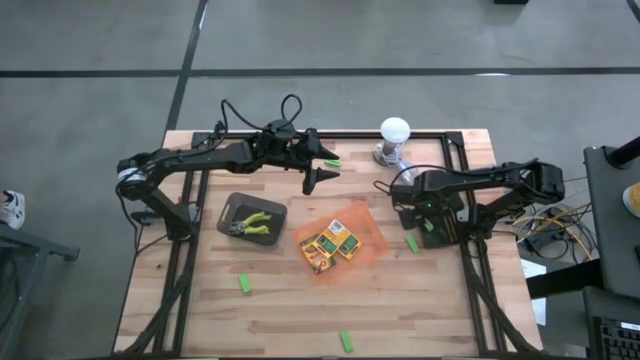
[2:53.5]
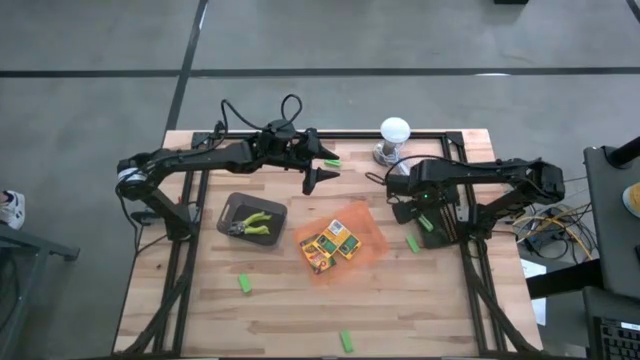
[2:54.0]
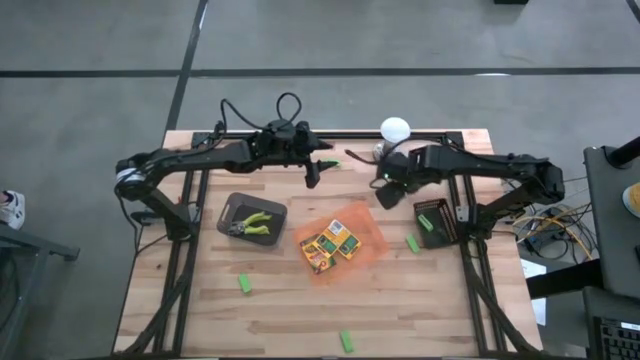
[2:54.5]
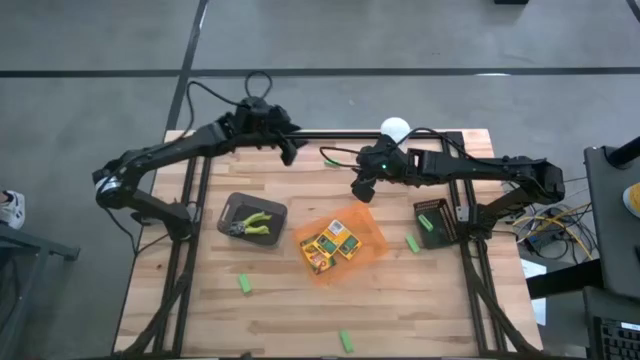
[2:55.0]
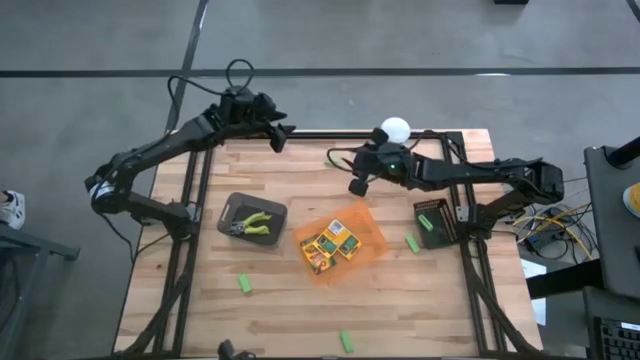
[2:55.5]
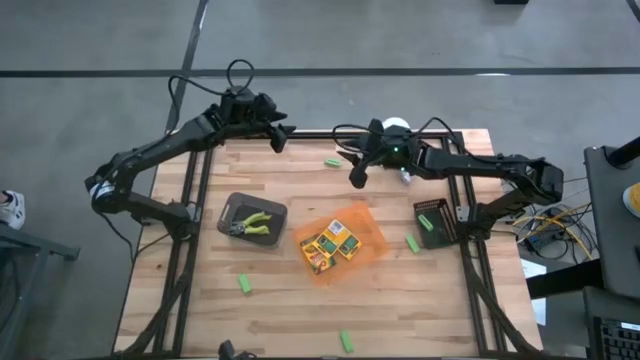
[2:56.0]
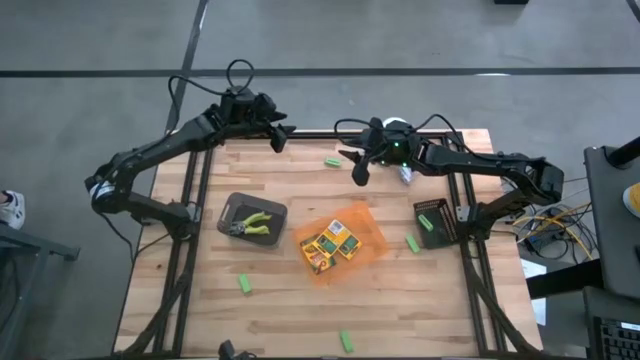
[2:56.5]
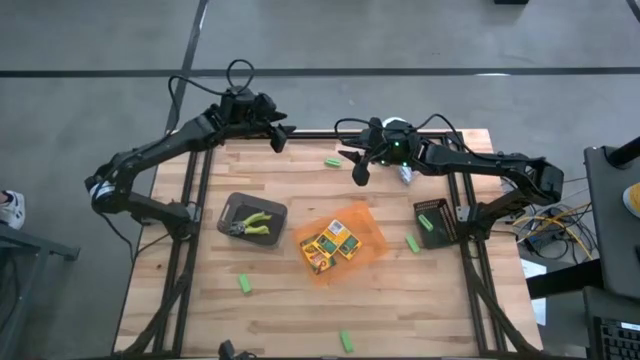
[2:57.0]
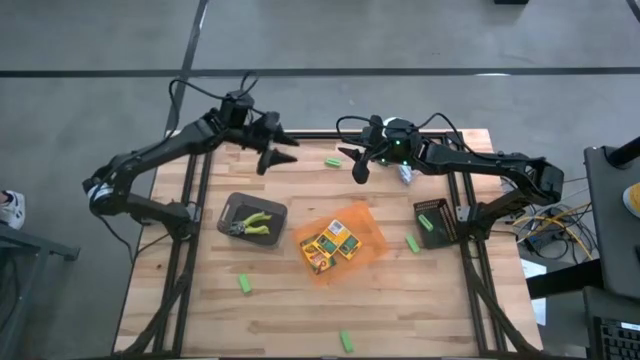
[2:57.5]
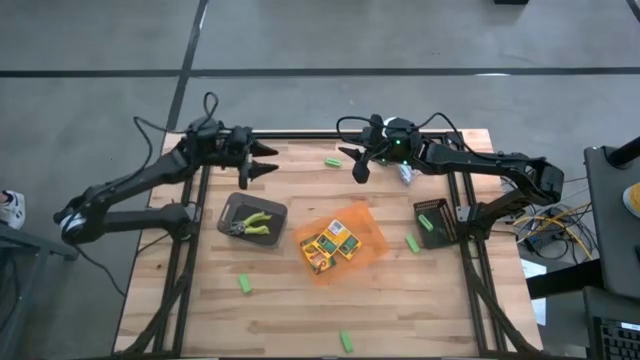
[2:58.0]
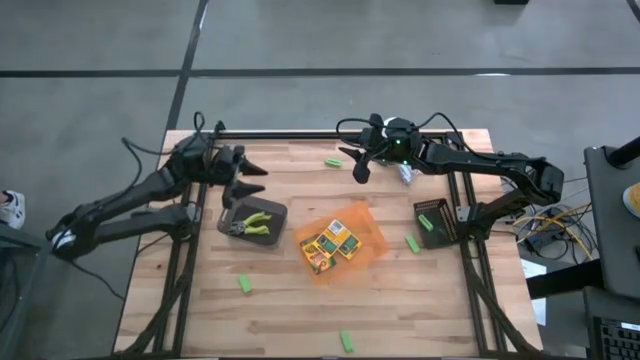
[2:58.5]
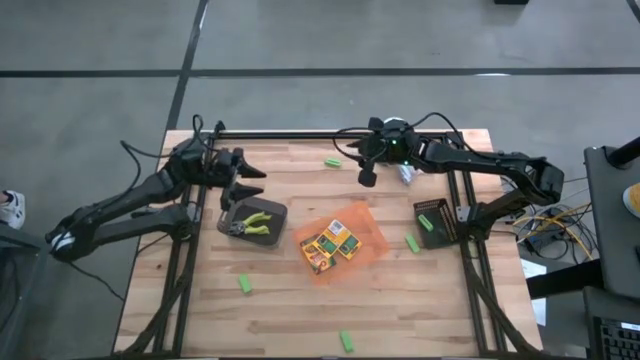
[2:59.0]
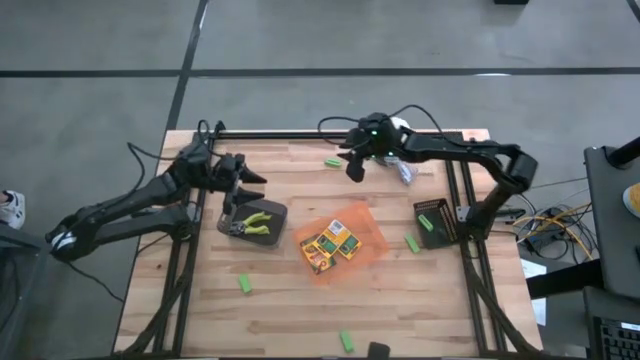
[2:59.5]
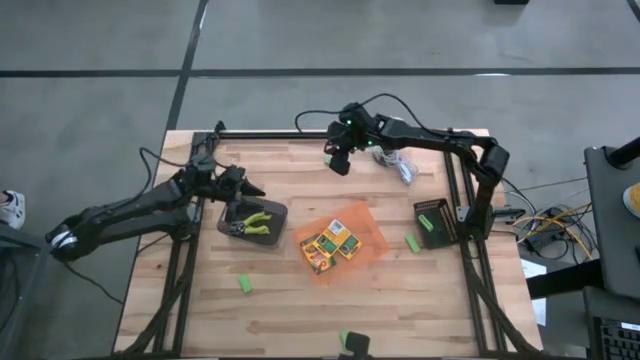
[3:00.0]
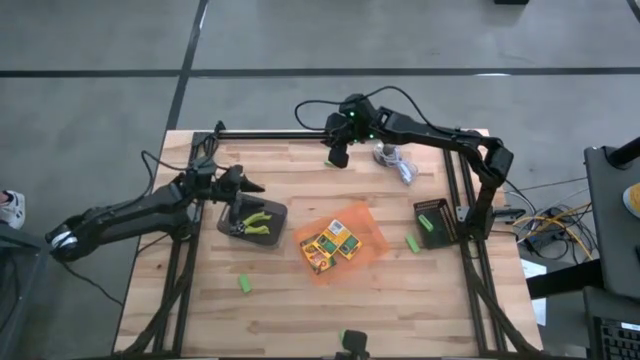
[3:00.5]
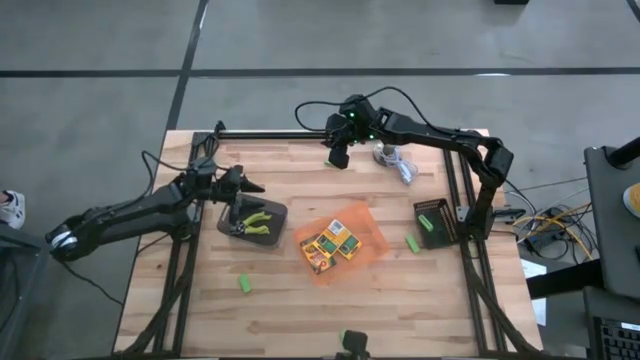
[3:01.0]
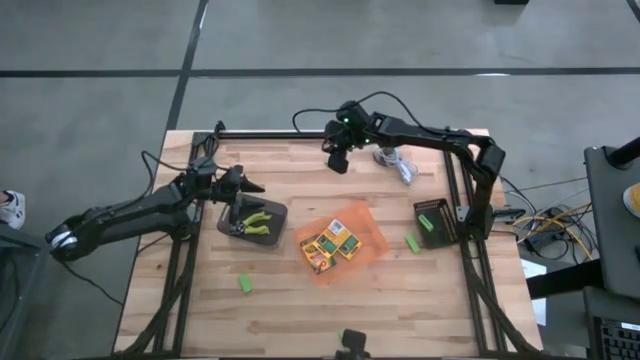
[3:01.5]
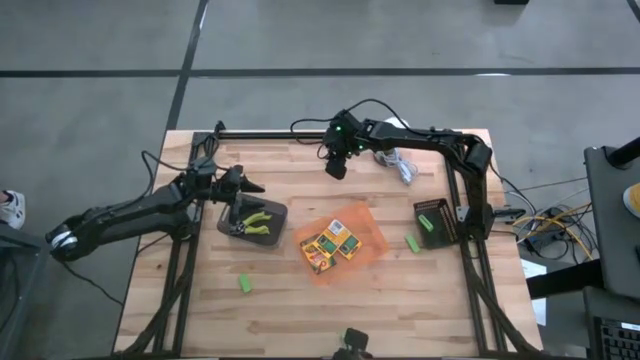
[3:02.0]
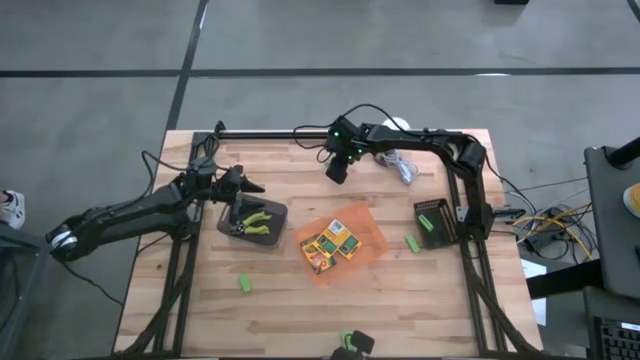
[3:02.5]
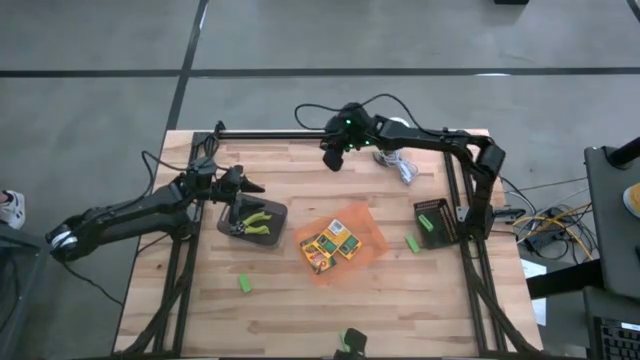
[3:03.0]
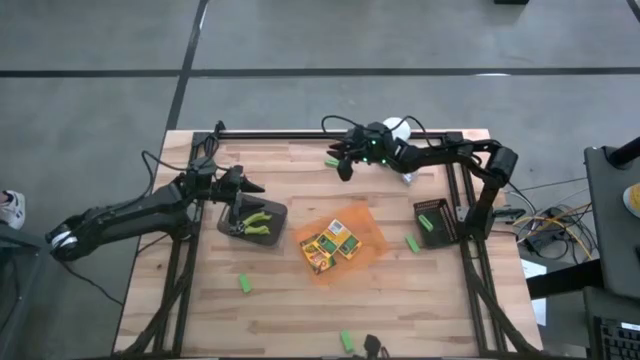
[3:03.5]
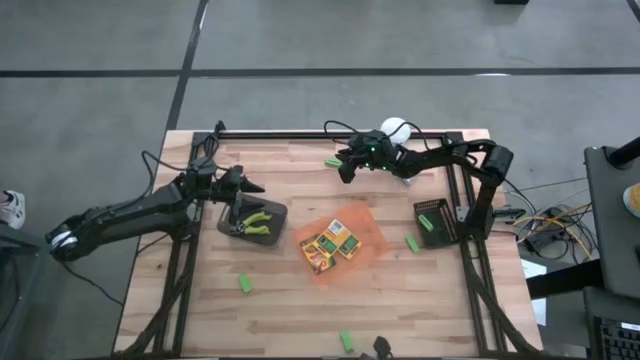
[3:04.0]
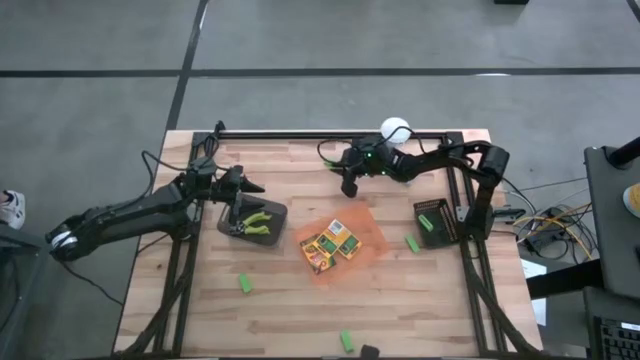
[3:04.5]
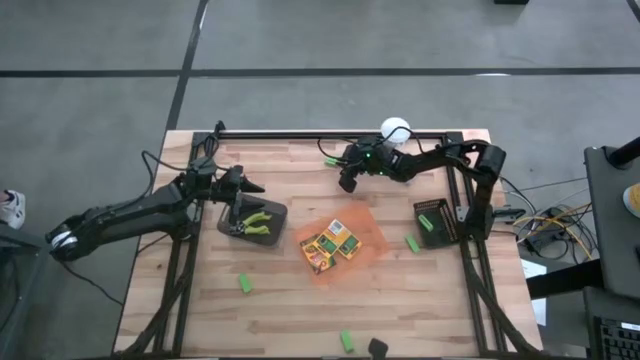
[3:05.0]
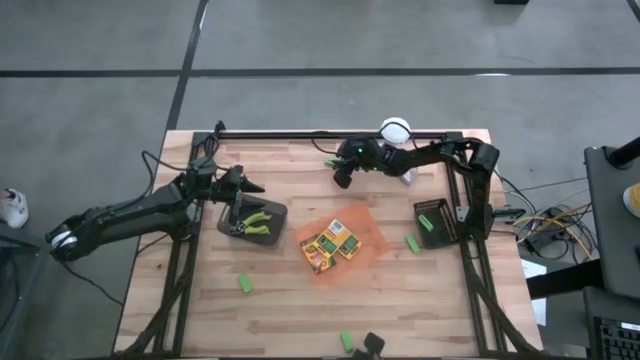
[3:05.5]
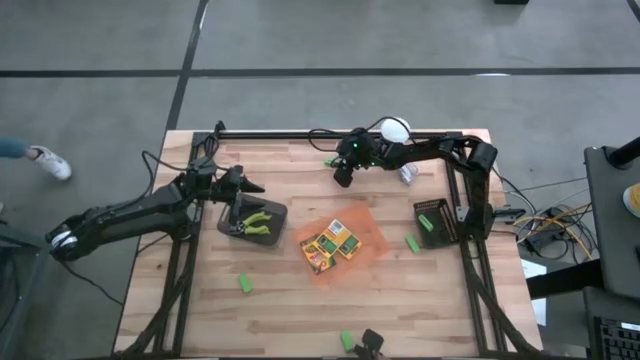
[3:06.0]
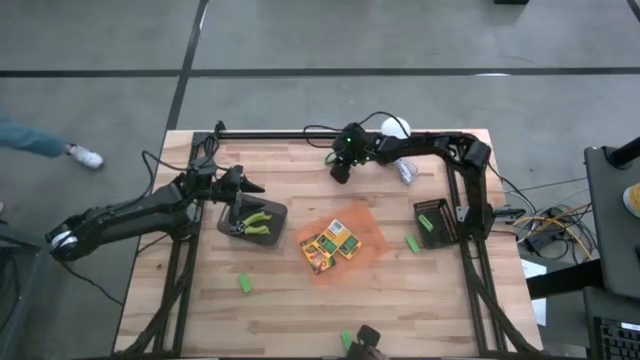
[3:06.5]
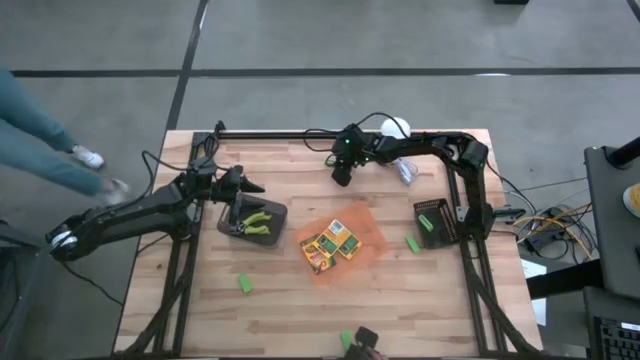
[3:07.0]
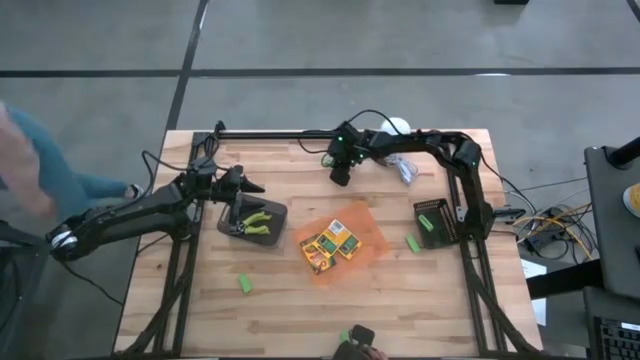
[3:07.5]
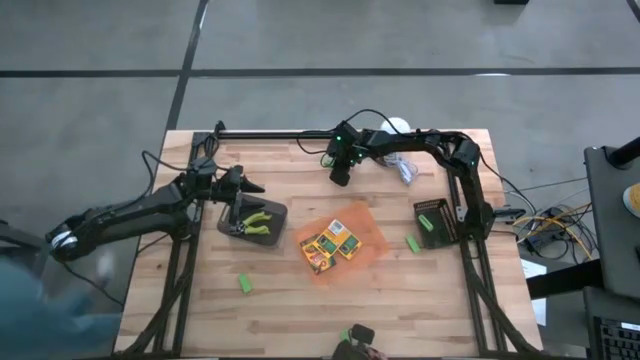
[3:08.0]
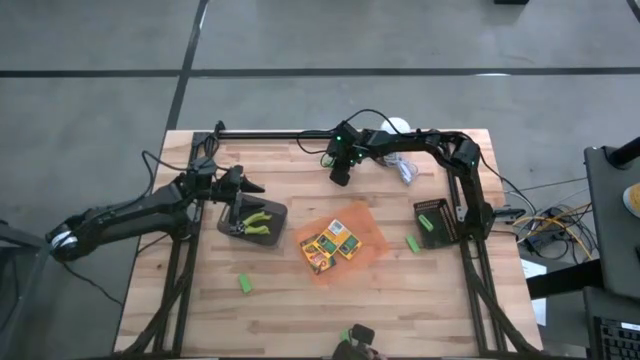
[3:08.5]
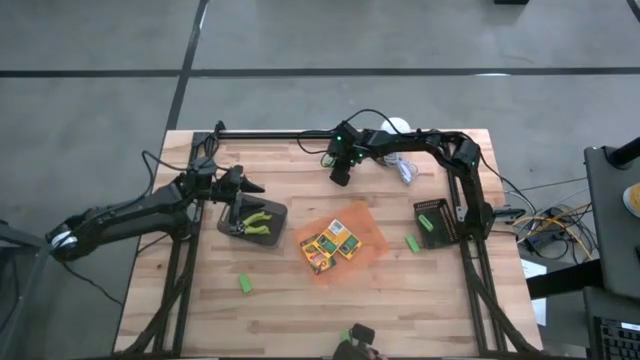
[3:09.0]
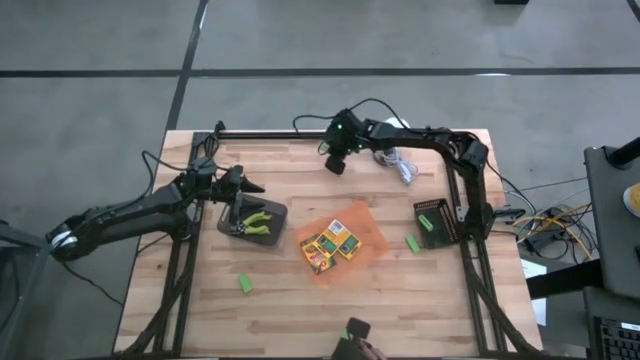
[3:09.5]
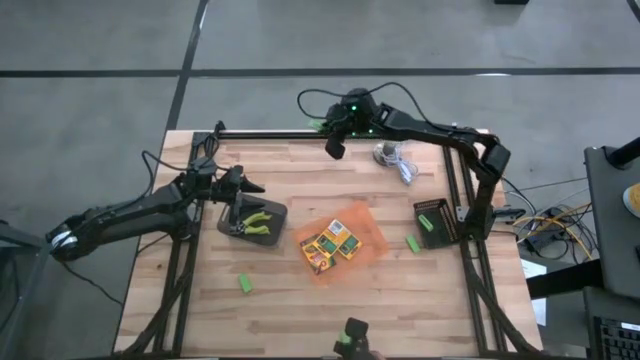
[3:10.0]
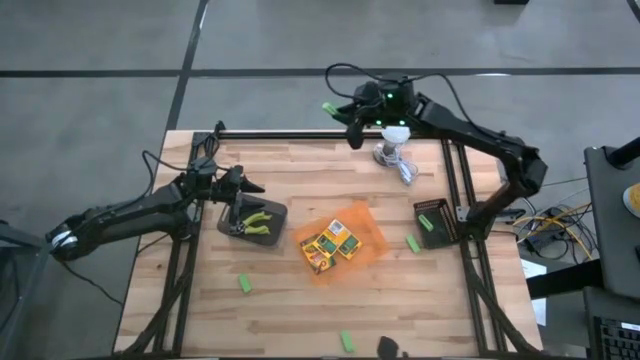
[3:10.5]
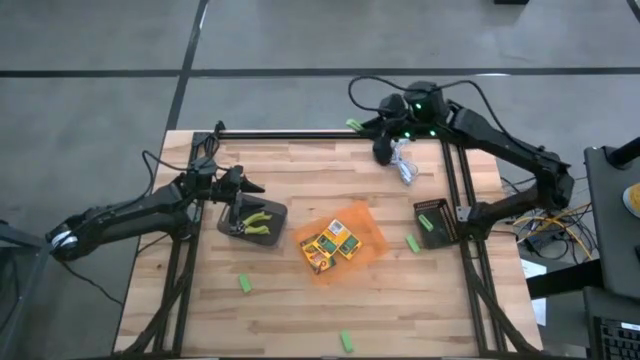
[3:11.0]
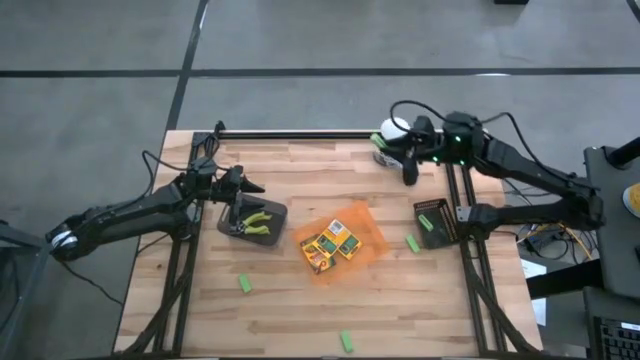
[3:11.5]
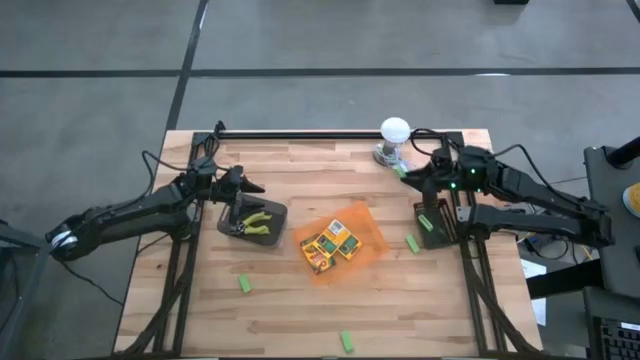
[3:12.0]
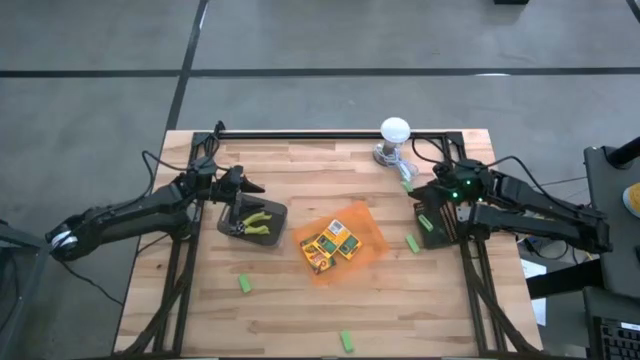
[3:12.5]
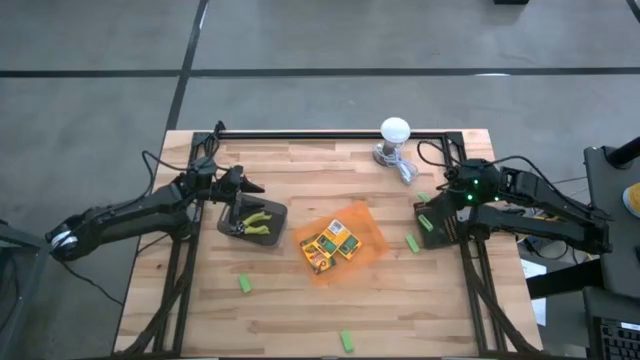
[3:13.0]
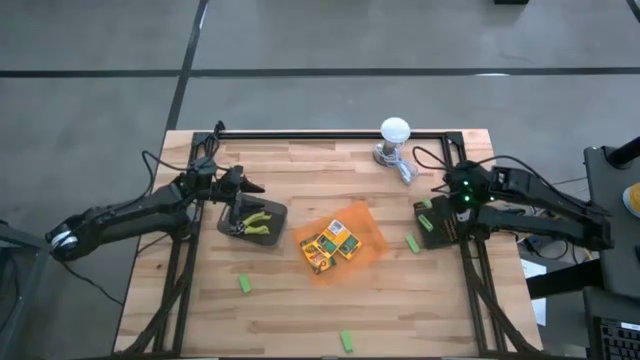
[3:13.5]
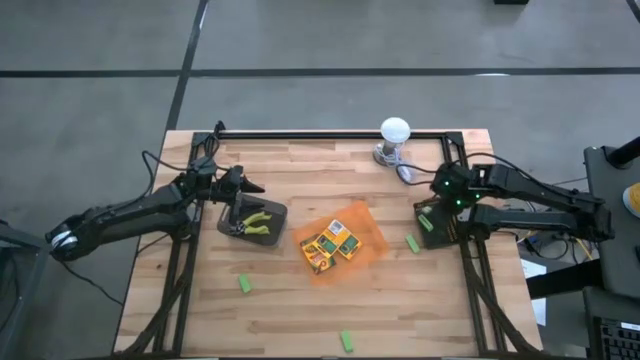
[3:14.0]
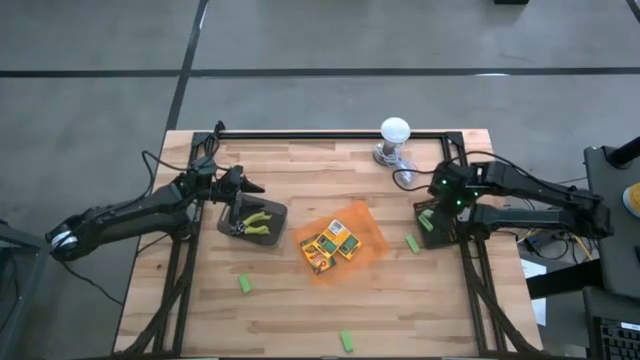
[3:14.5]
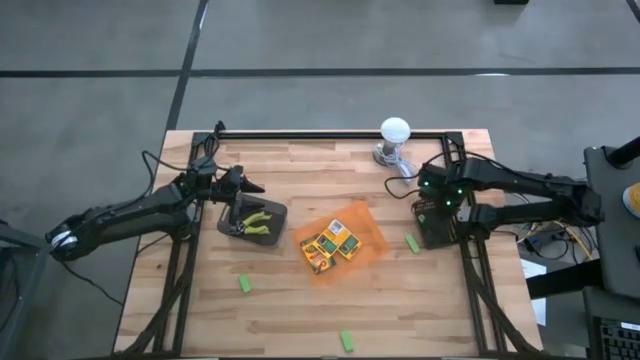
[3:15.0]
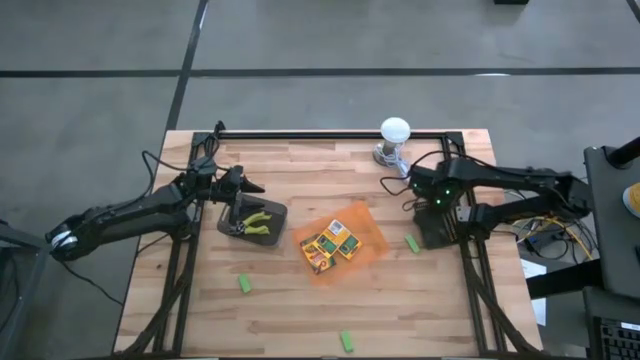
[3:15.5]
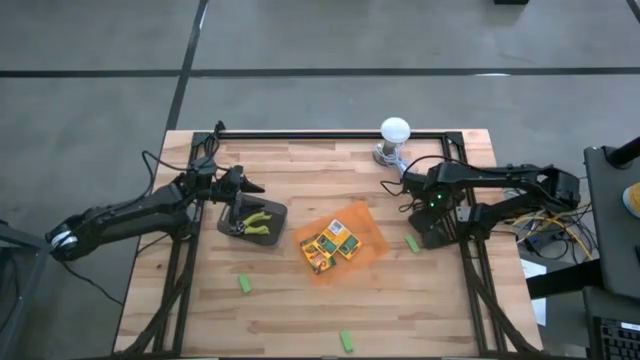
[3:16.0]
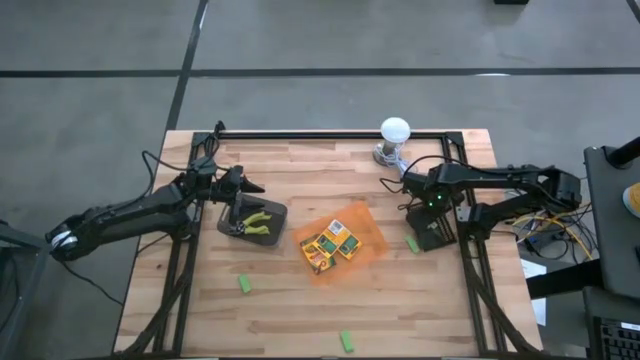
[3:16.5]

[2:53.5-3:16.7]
Task: Pick & Place School Supplies
Put the top green eraser into the black basket
